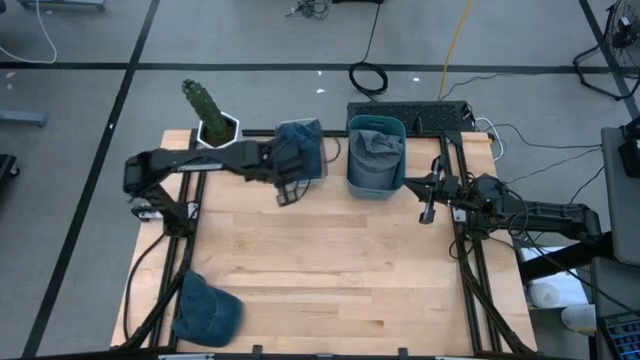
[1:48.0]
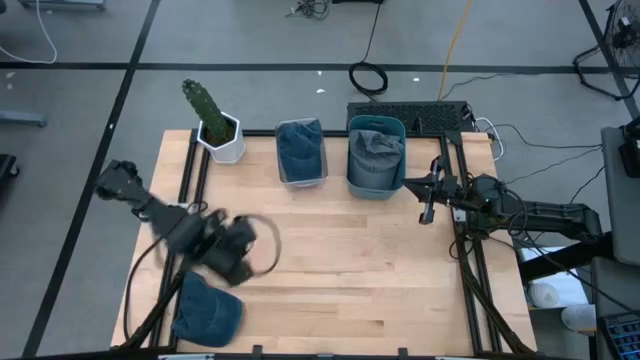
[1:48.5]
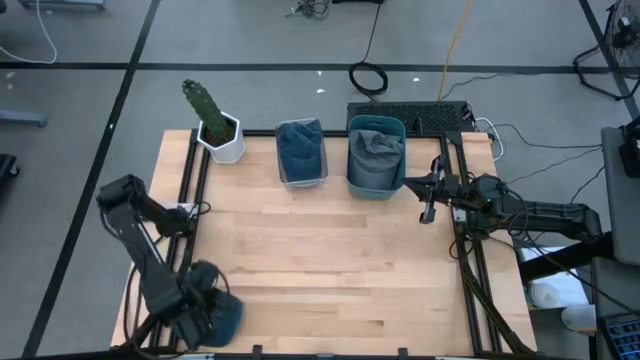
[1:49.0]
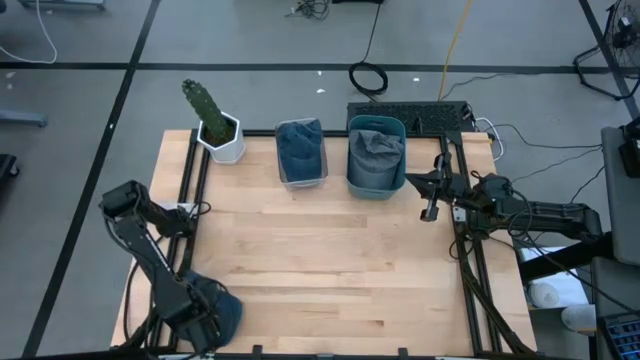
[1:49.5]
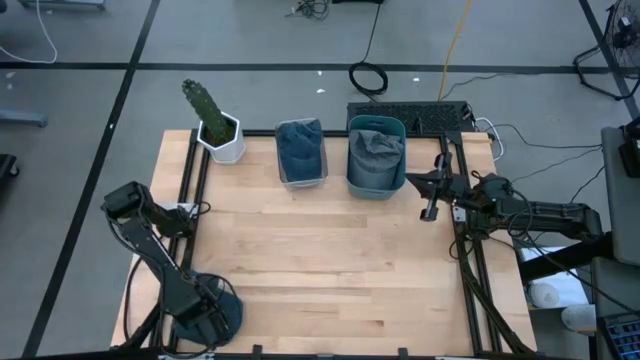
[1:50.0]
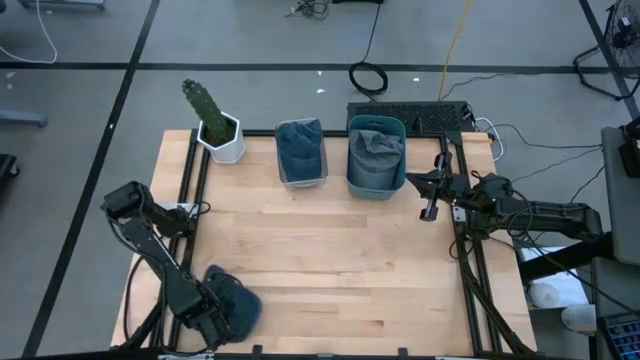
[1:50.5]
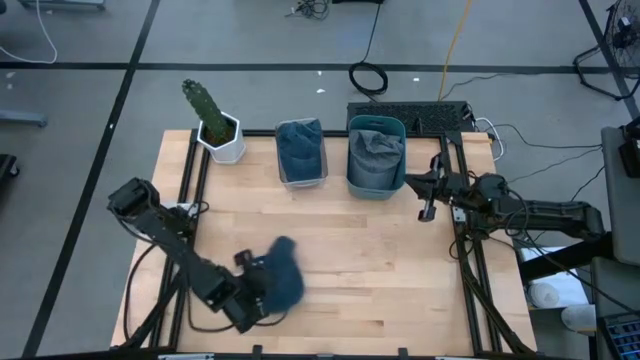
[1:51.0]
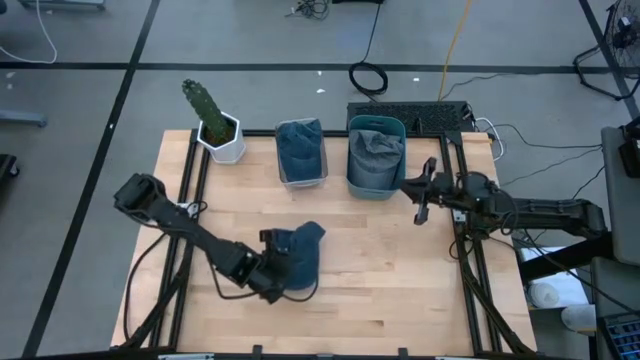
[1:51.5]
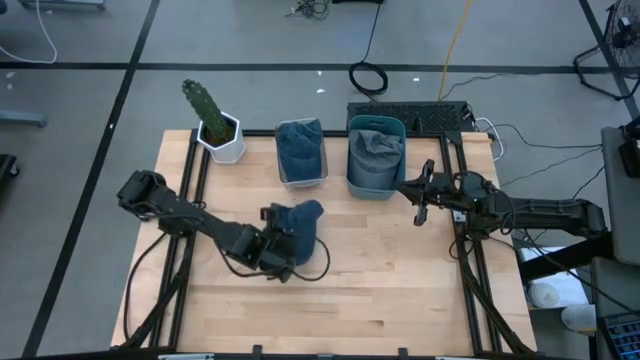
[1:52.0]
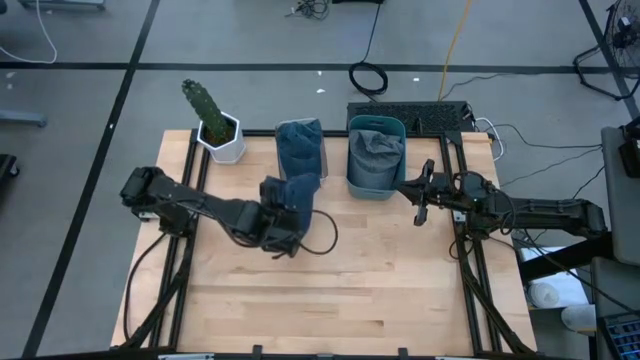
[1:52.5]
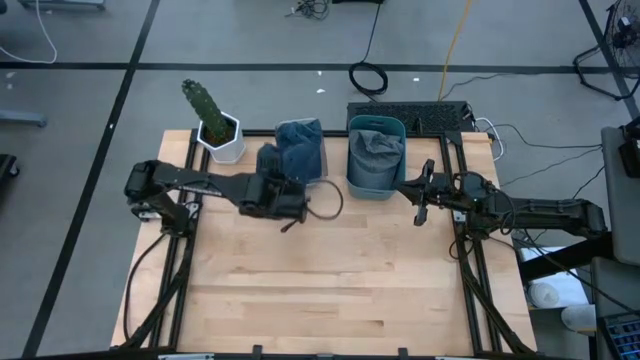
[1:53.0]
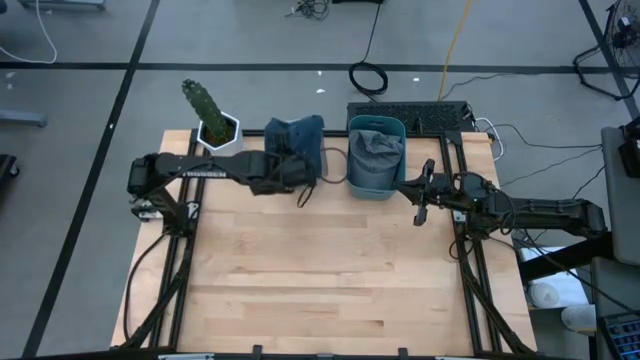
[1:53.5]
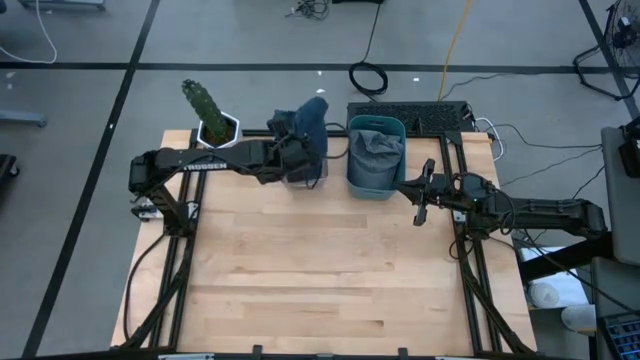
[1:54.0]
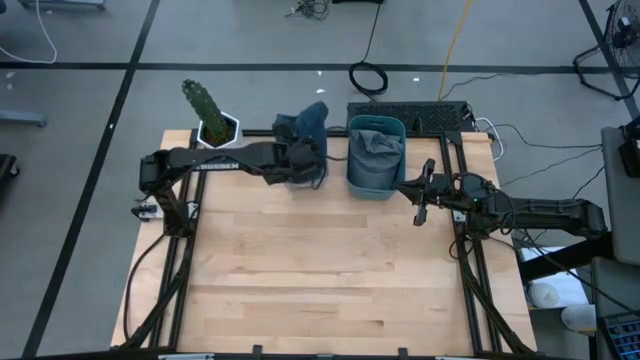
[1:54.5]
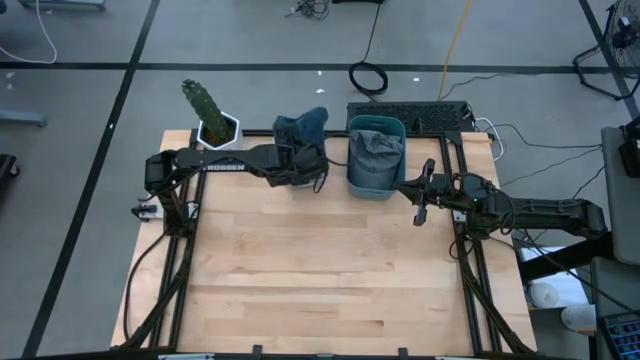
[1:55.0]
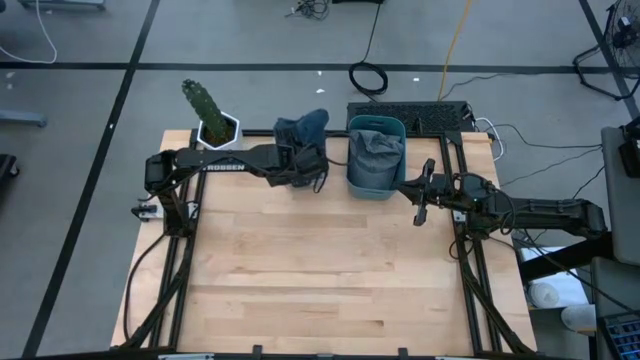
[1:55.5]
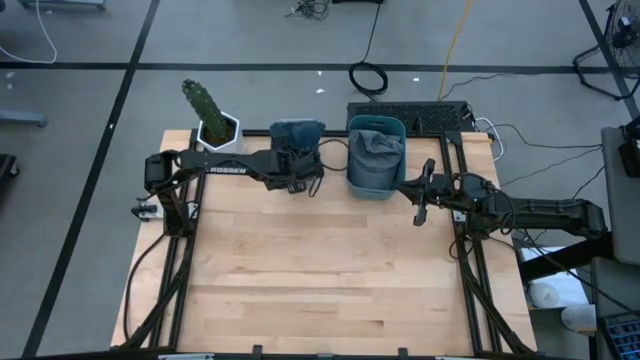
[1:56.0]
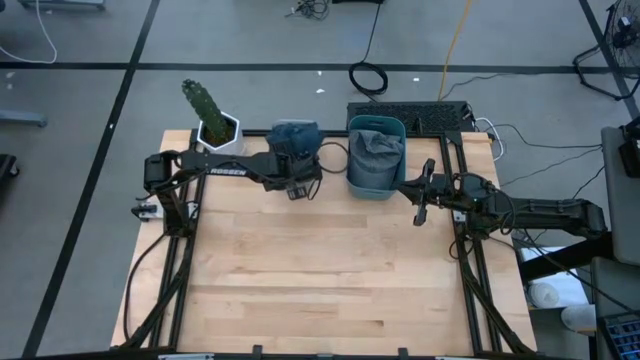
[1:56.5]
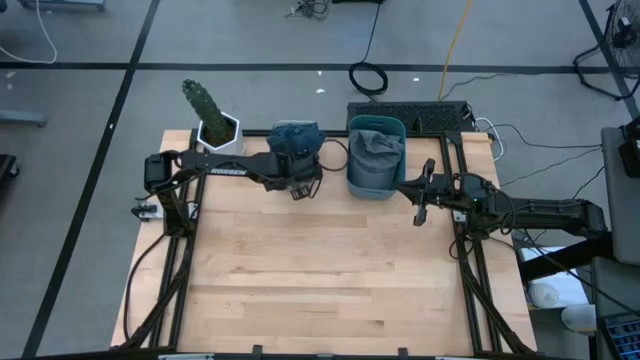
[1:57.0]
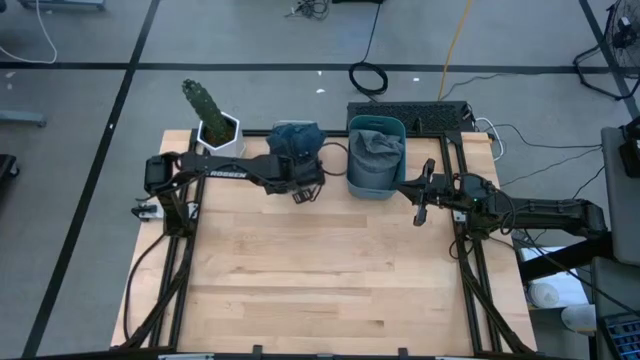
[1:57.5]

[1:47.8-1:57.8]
Task: Pick & Place hat
Put the blue cap into the transparent bin

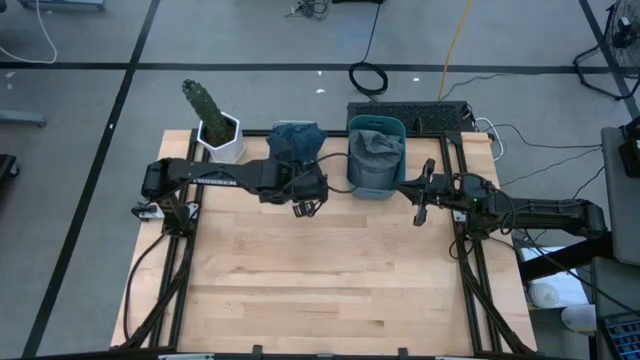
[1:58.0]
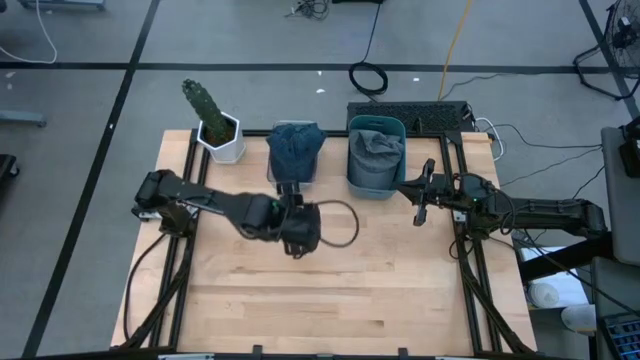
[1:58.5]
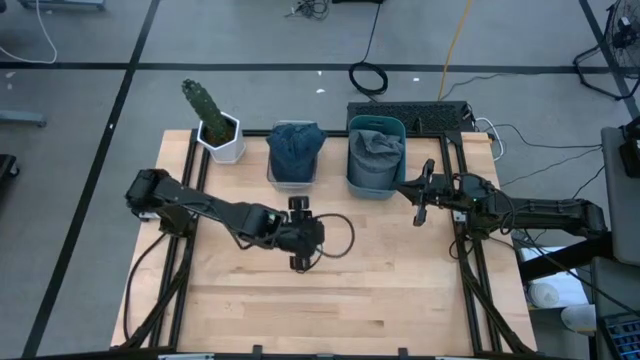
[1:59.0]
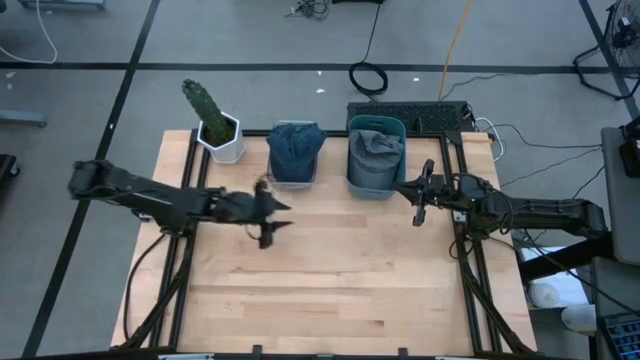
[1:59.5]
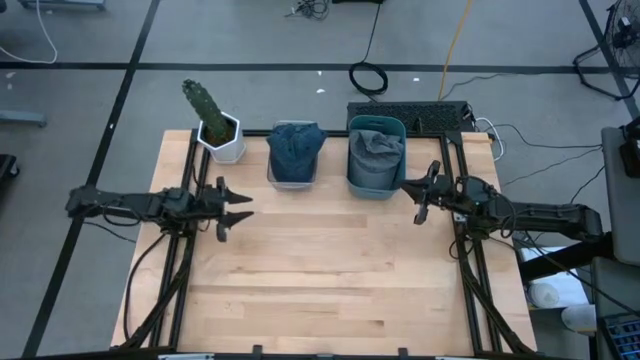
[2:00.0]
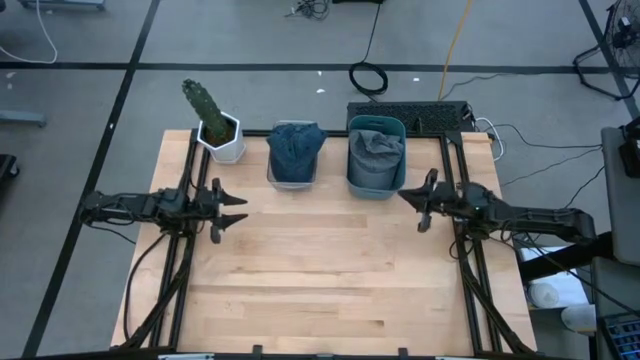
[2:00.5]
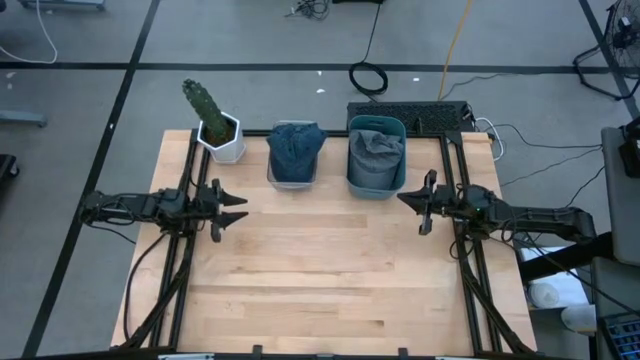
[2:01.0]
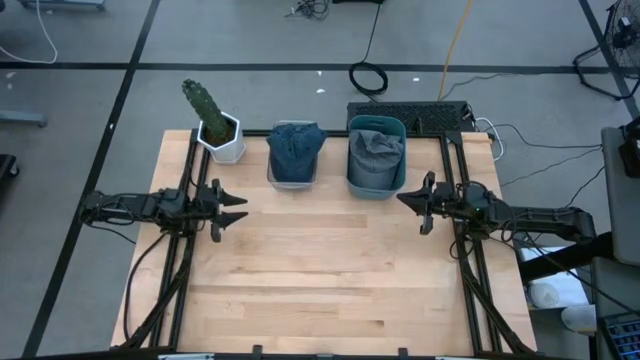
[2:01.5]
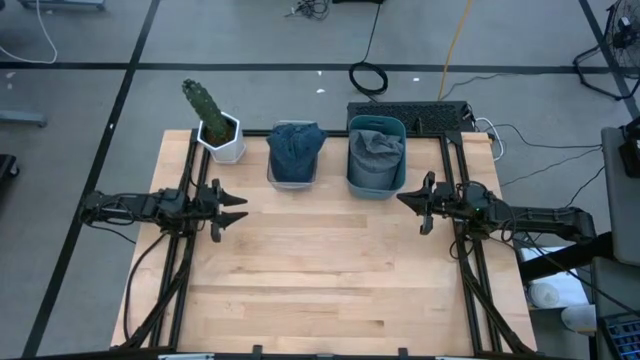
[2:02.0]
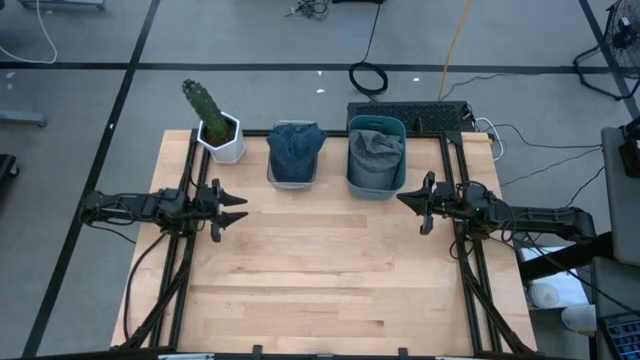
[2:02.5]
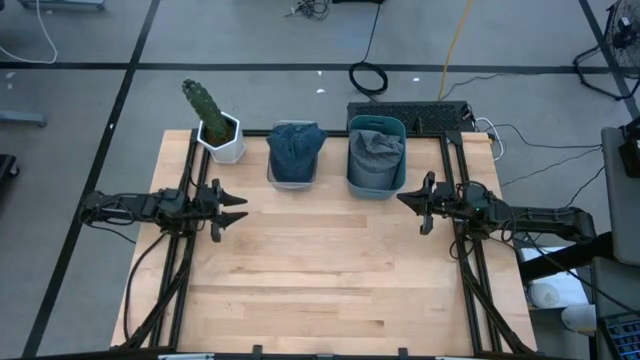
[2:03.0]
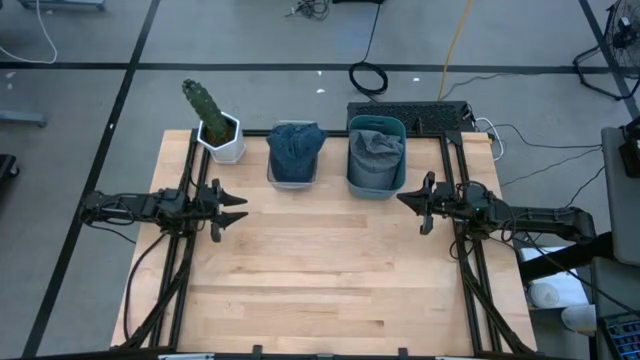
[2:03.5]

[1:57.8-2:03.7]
Return to Home Position

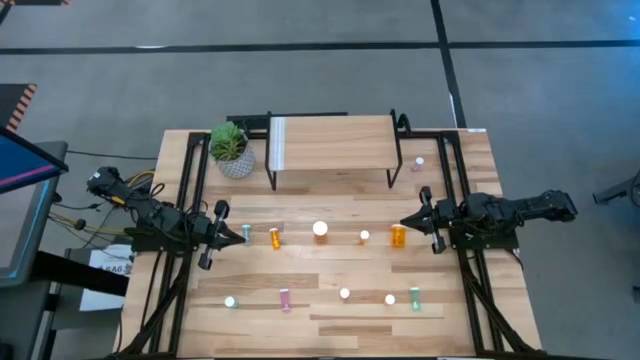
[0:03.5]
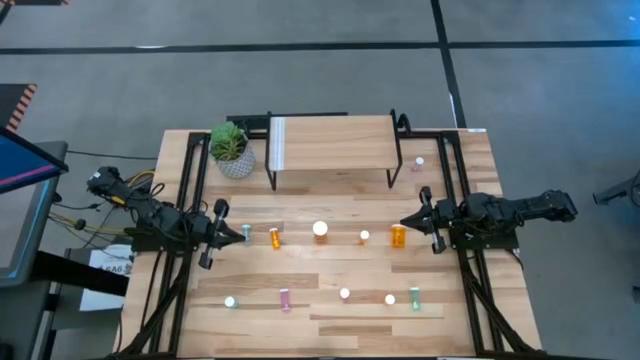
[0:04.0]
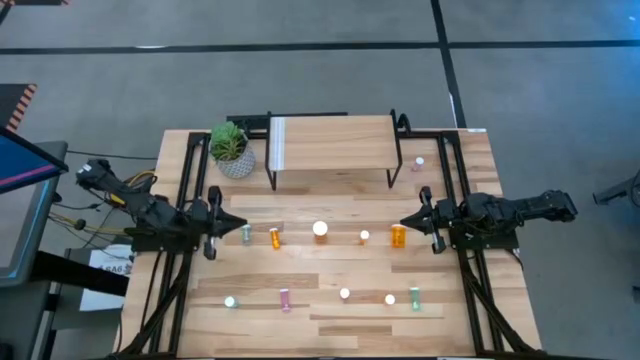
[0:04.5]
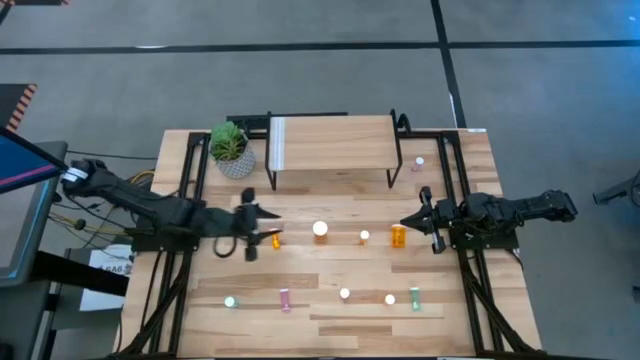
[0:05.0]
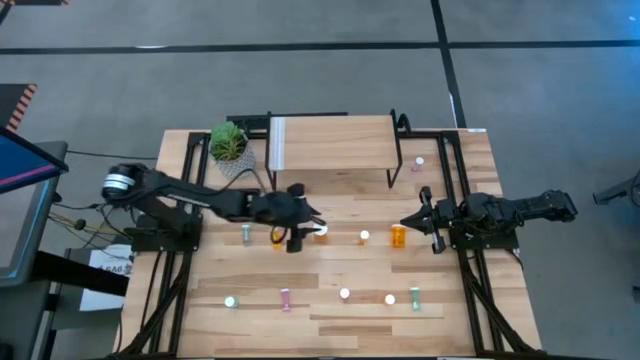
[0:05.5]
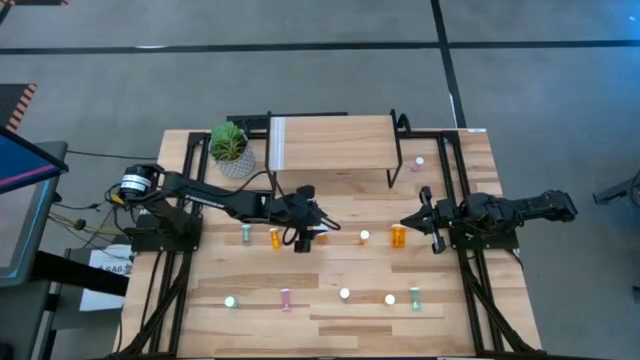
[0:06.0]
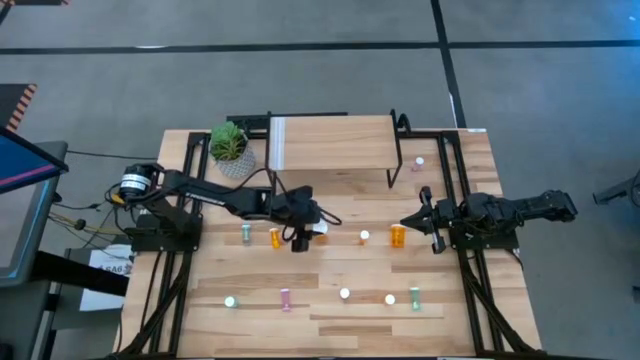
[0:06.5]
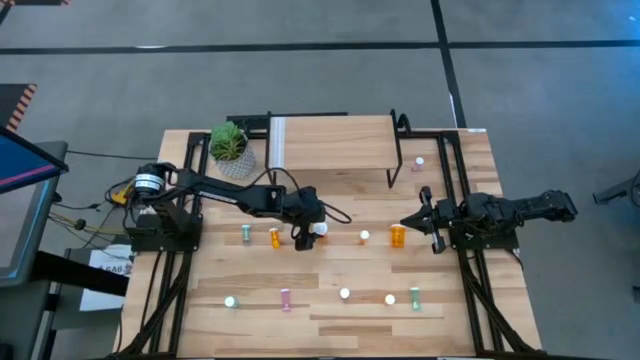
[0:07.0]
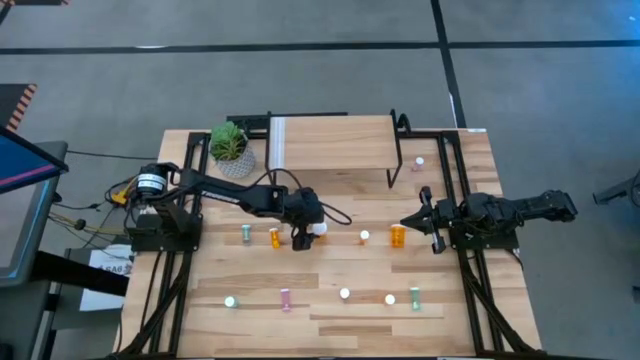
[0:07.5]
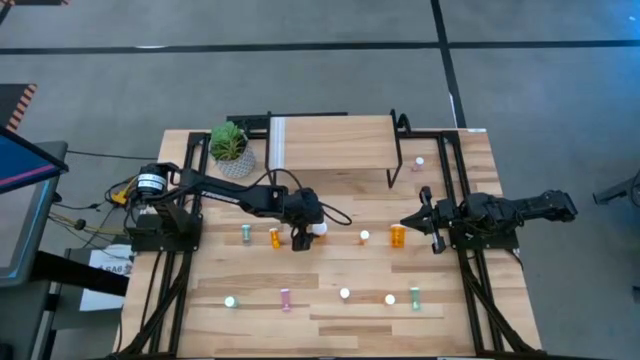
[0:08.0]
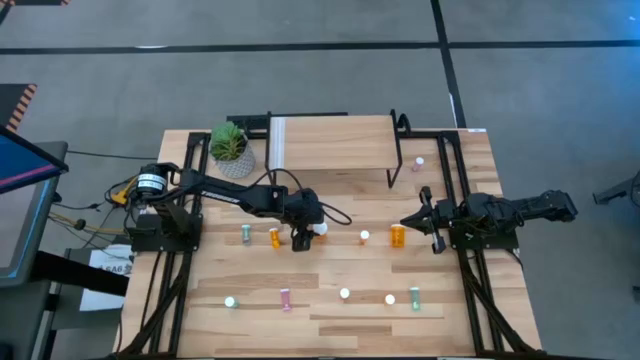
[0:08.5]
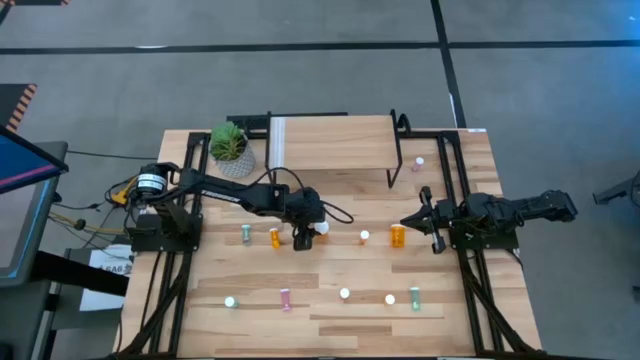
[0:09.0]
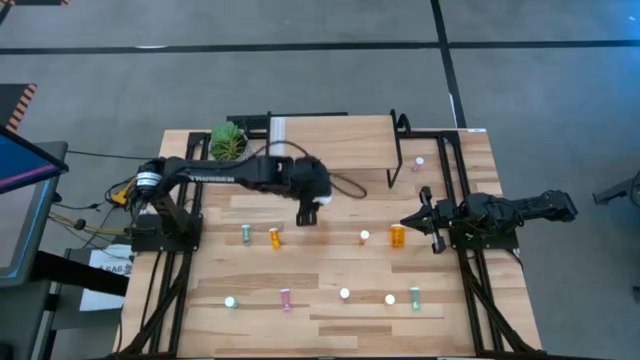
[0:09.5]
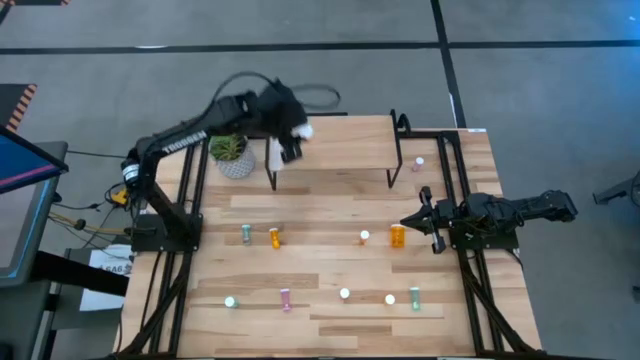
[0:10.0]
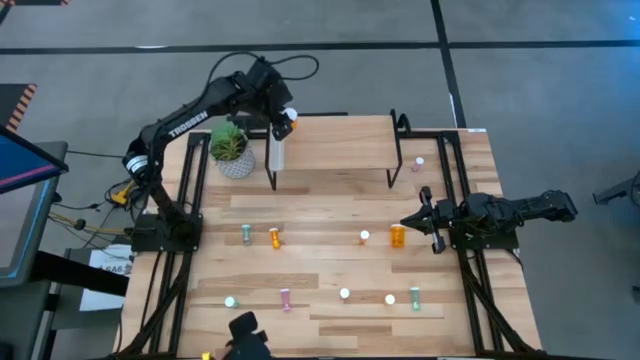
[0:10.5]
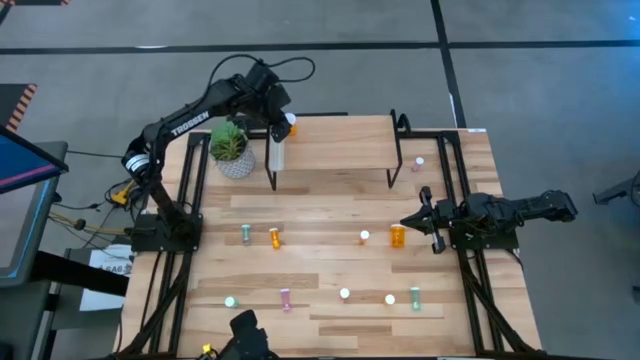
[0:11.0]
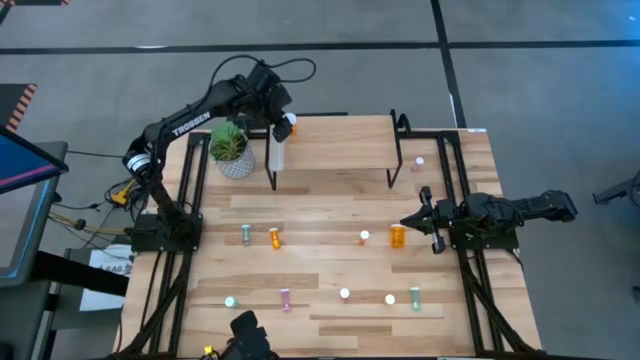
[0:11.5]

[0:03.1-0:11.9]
Task: Pick and place medicine bottles onto shelf by color
Put the left big orange pill bottle on the shelf
